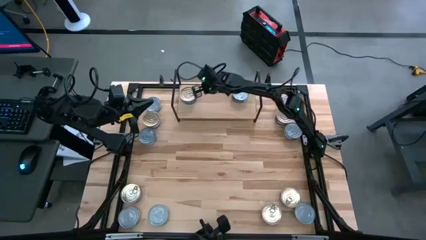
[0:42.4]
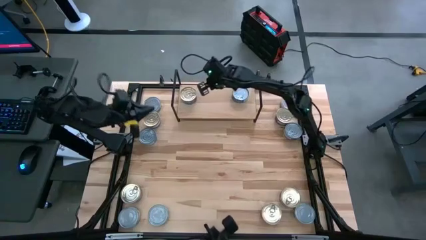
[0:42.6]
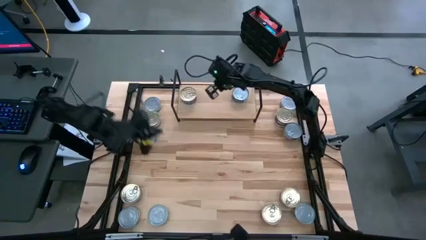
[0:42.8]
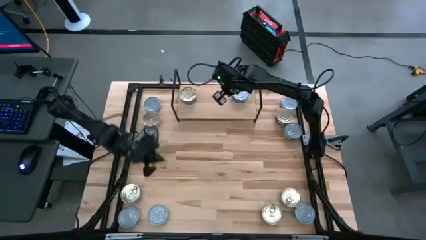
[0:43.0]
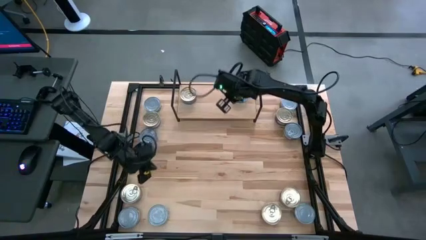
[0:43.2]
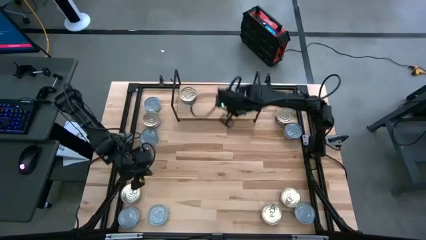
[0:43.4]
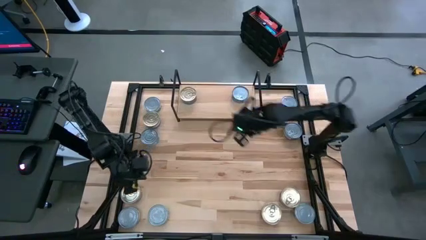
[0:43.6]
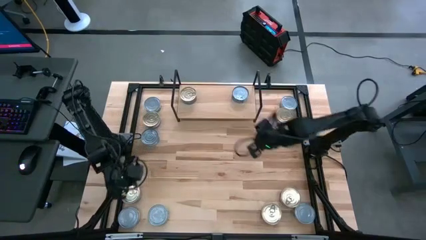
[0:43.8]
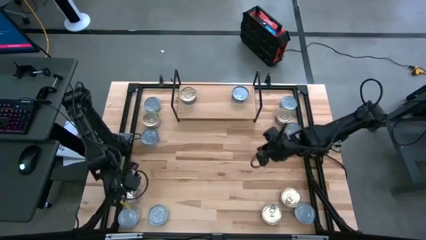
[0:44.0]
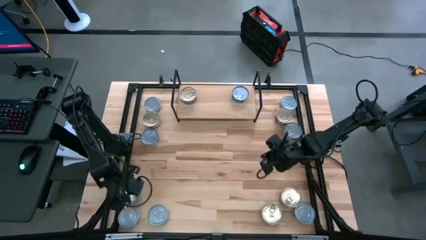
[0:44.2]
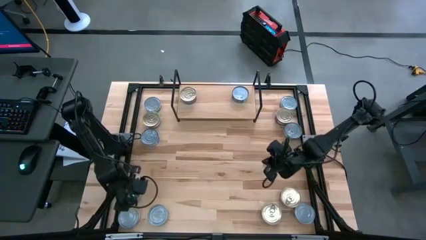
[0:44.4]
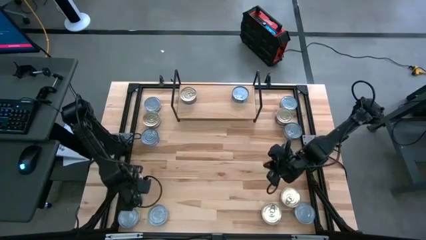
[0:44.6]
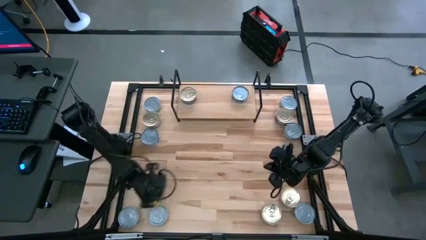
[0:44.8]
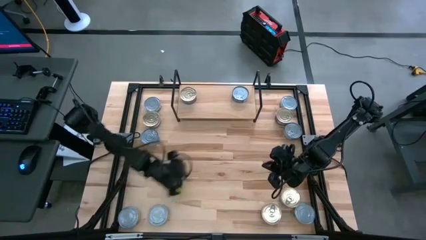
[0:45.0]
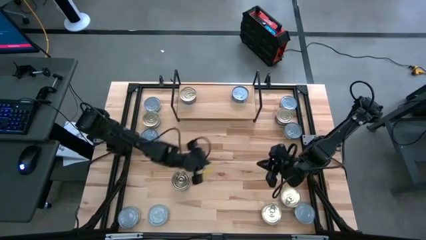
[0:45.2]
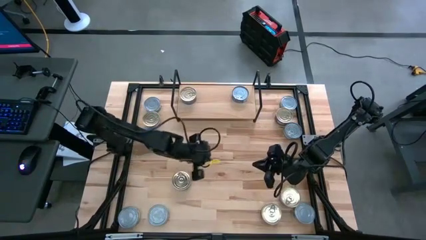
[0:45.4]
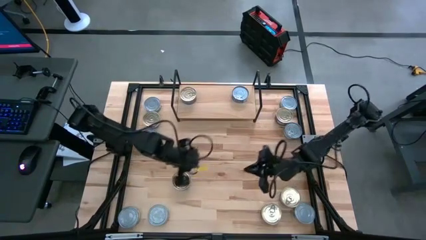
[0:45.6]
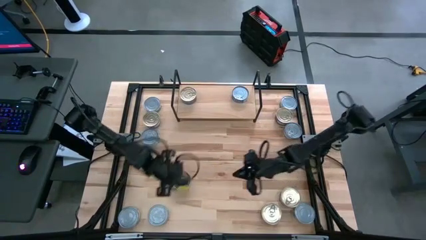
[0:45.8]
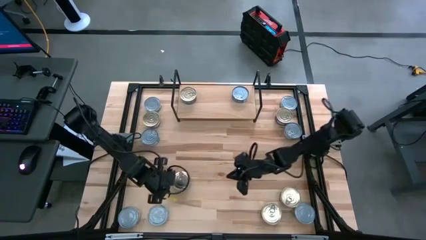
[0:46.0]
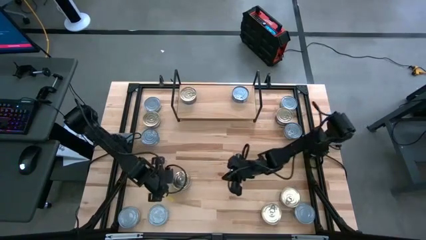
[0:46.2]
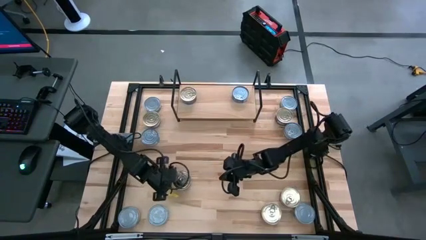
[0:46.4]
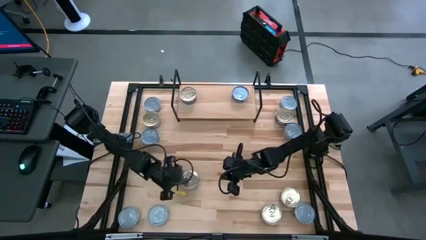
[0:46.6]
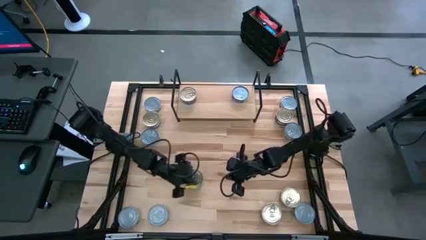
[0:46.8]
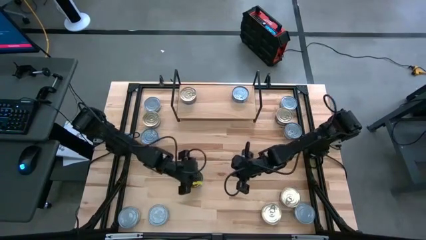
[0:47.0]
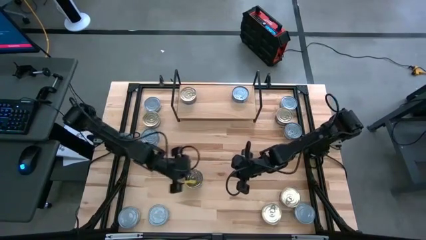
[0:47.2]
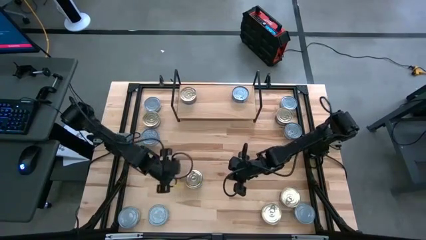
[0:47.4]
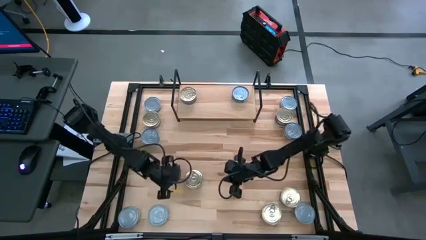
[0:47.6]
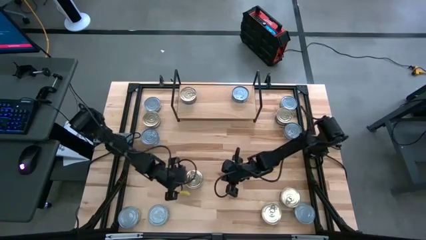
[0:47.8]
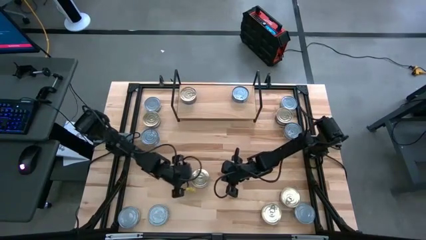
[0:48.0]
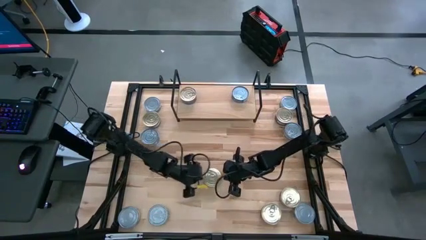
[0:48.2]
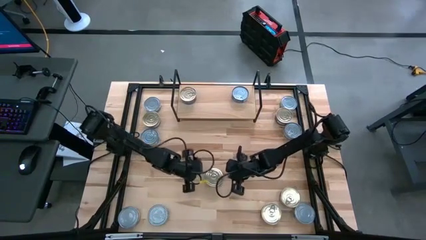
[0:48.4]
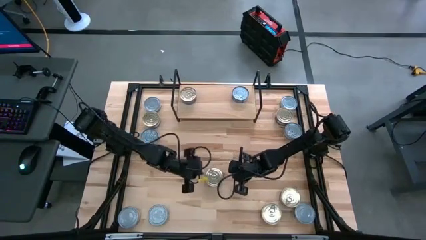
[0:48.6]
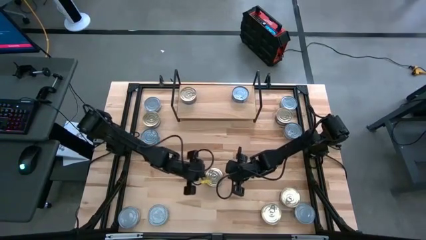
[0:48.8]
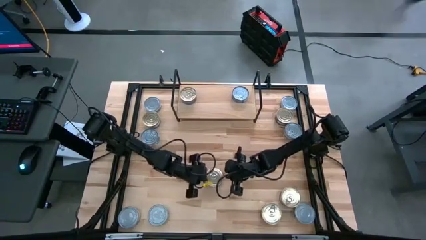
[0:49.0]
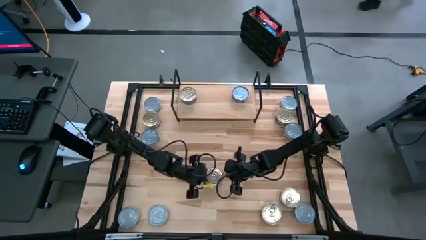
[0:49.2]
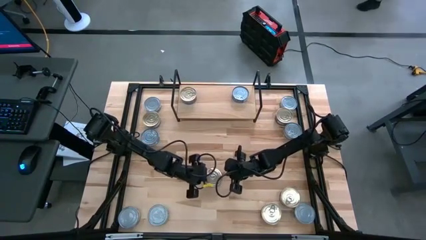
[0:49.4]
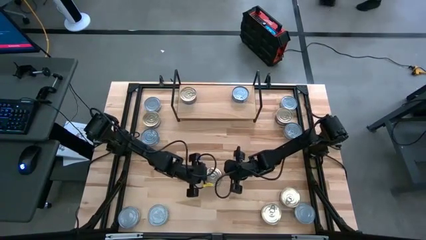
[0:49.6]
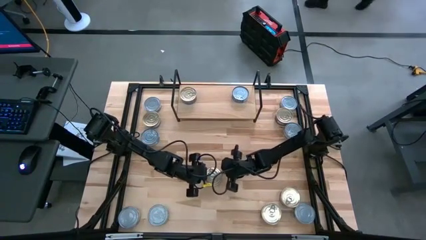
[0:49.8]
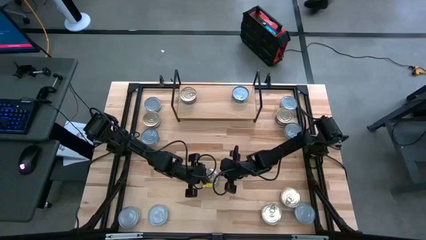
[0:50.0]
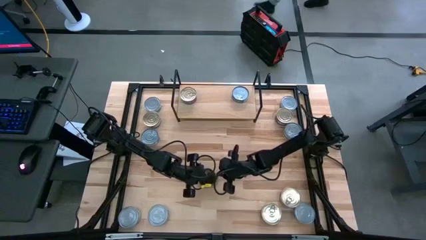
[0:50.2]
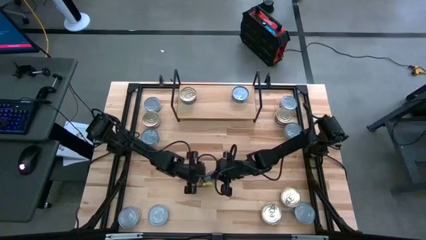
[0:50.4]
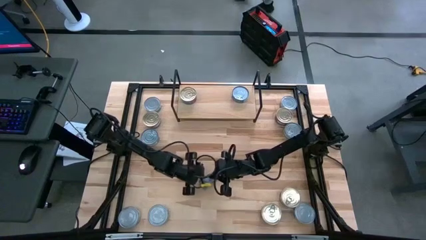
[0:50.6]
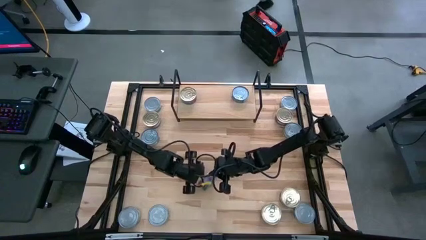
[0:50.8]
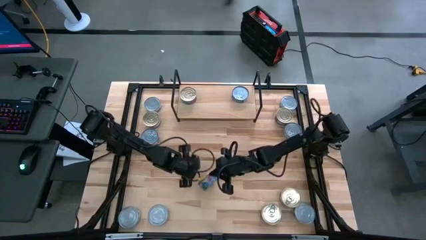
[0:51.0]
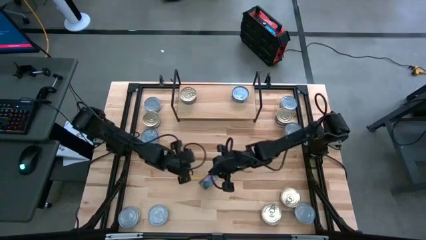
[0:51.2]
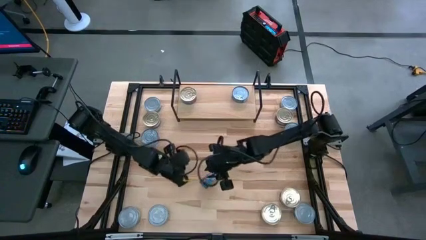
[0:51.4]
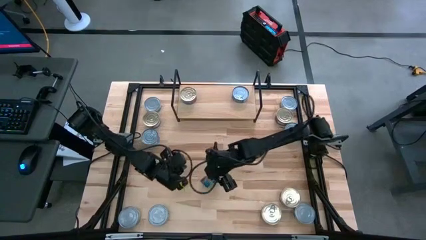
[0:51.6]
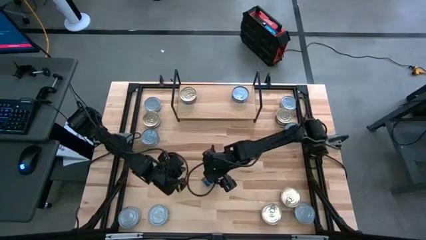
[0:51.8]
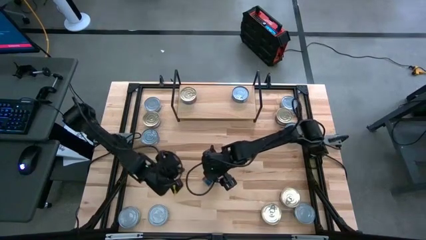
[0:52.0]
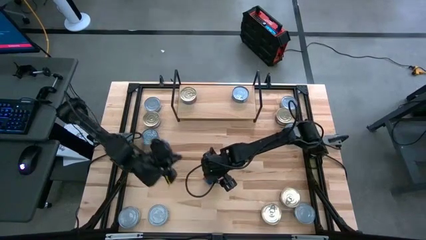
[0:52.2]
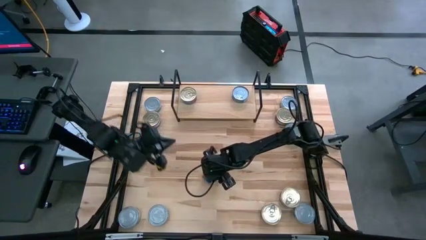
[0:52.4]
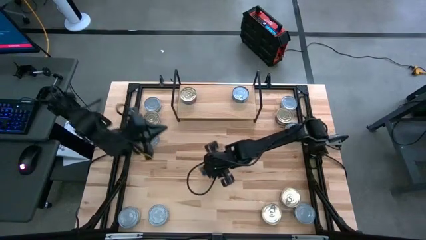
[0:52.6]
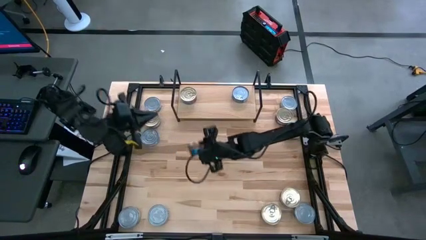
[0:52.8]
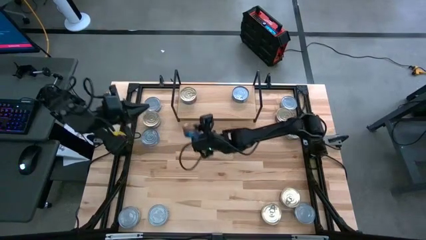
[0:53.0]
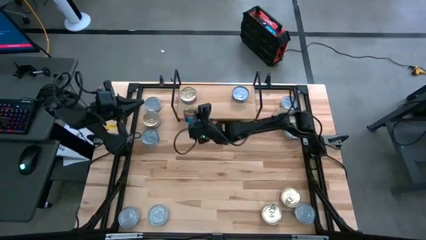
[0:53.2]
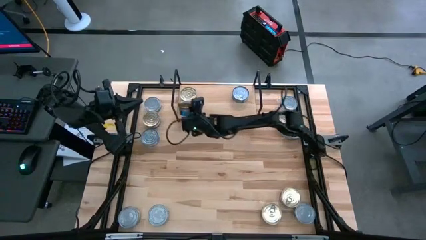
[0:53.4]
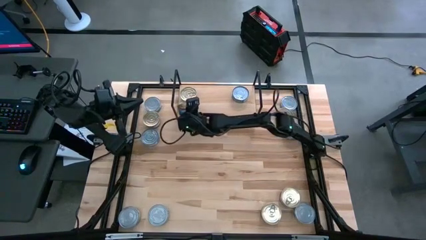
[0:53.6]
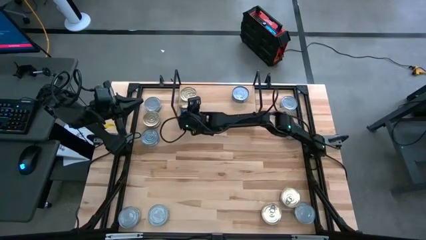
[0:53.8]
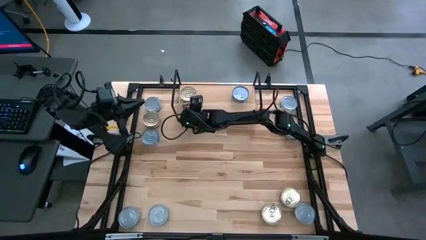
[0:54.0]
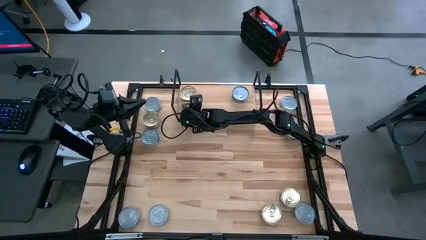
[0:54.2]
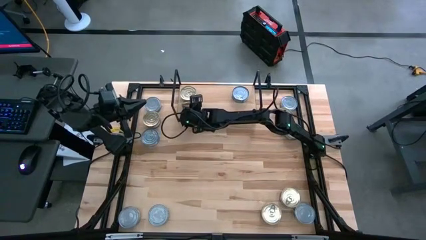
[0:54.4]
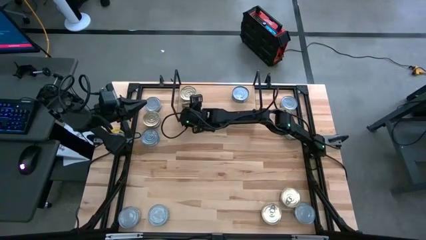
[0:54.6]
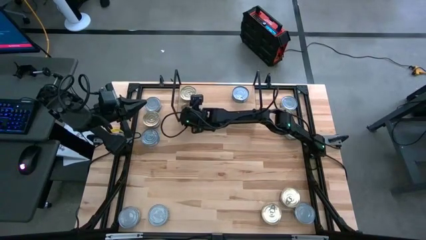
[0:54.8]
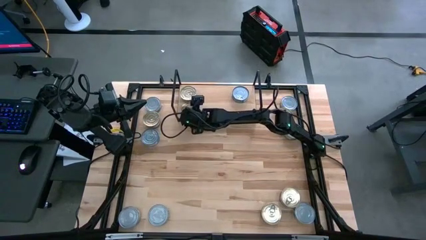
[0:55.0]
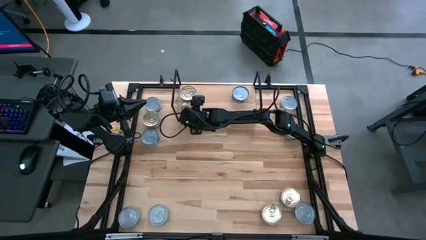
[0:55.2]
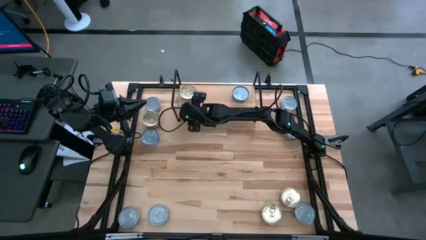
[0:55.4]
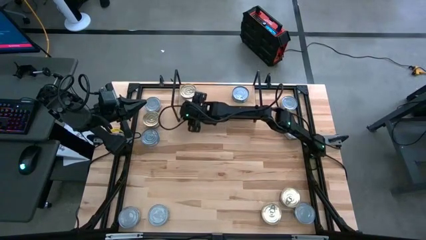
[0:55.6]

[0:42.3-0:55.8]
Task: Stack canned seafood by type on shelf
Put the blue pink tuna can on the shelf

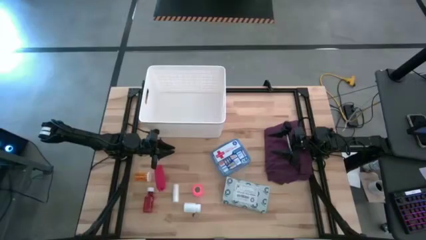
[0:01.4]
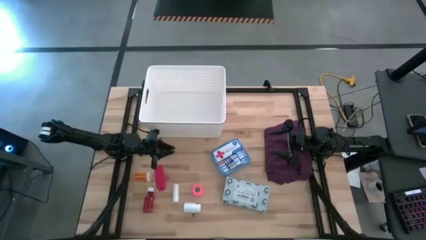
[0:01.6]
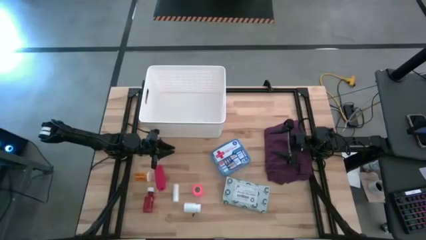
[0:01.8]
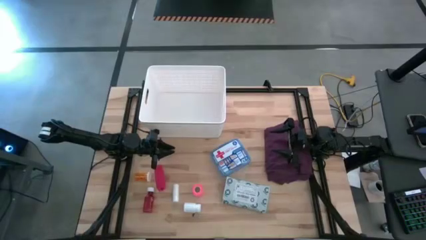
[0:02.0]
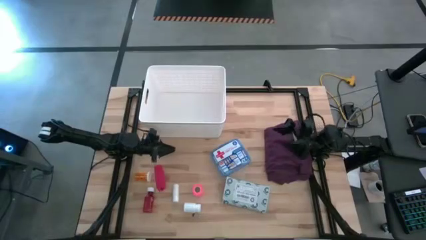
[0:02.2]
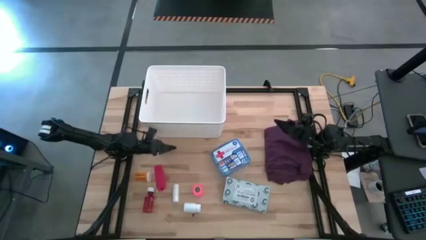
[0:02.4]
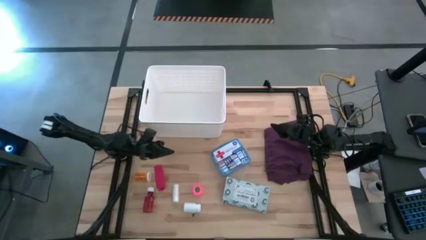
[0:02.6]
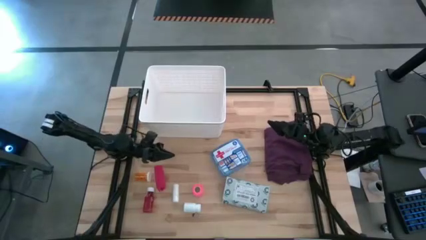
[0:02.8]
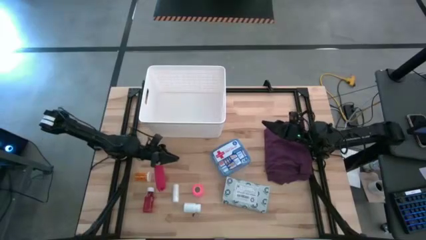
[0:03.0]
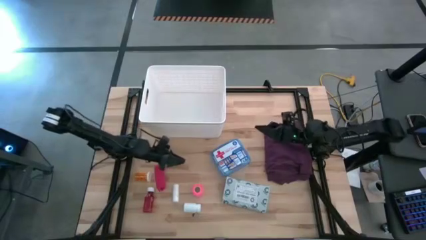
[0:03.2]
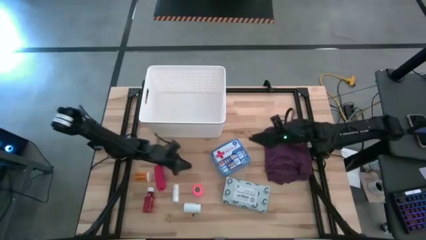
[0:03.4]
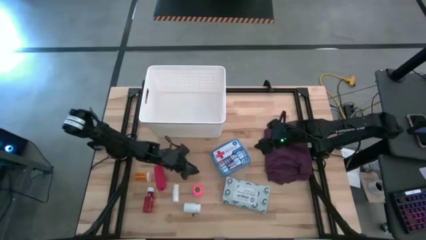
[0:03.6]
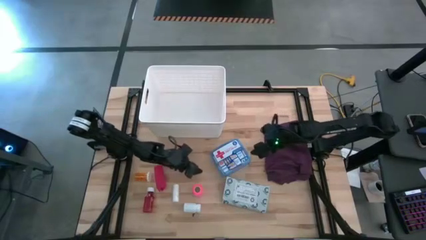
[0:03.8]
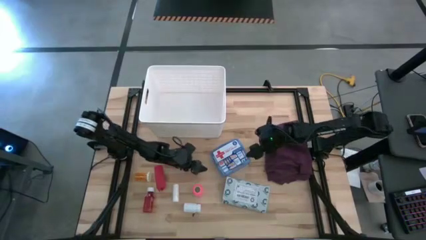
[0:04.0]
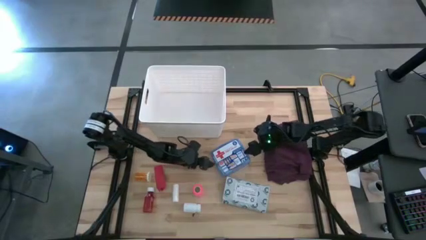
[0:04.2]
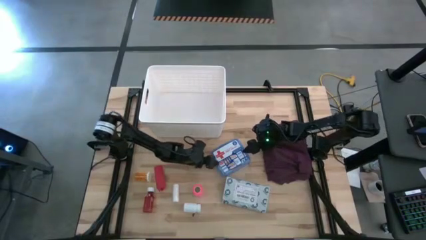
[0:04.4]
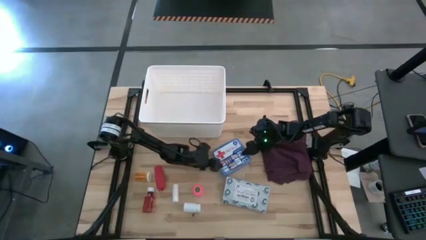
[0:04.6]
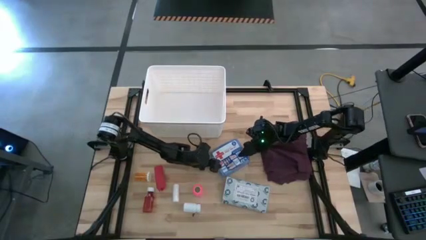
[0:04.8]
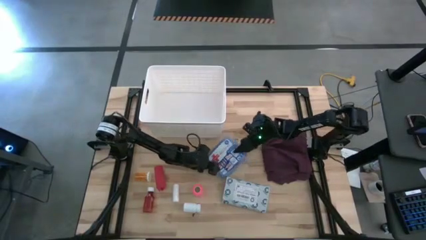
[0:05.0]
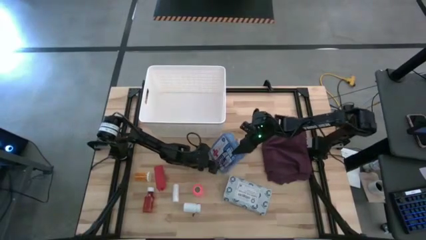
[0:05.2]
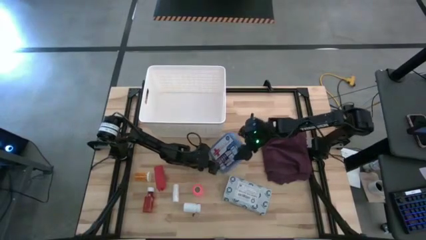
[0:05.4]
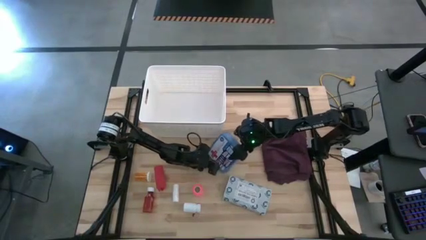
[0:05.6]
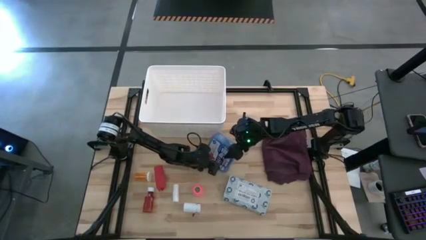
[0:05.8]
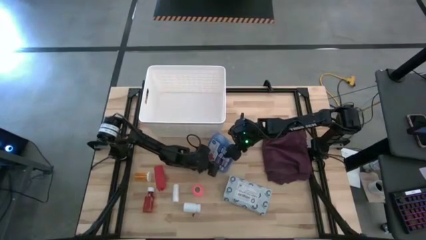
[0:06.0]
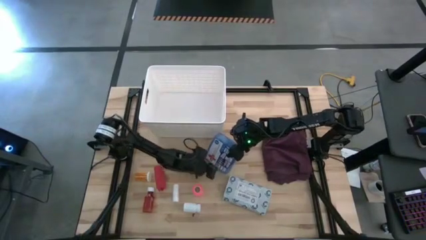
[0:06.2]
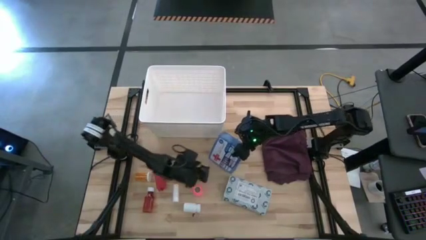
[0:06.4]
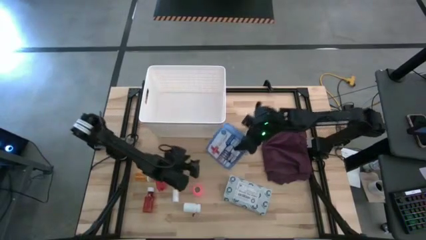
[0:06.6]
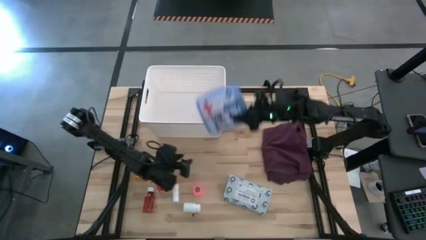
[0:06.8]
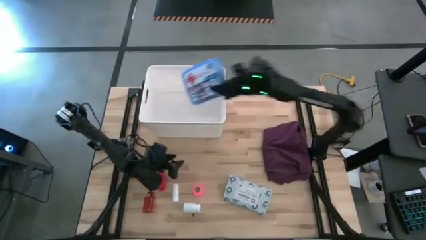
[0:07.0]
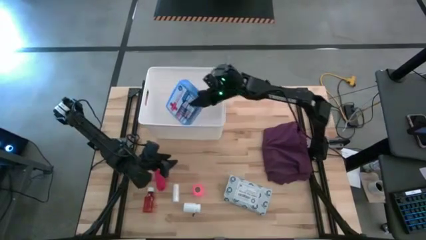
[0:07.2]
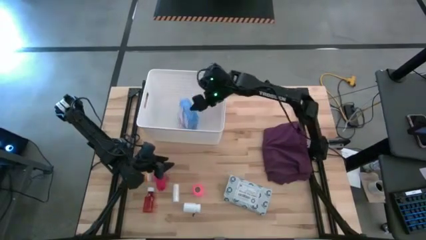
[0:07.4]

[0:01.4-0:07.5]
Task: Pick & place medical supplies in basket/bin
Put the blue first aid kit into the white bin
